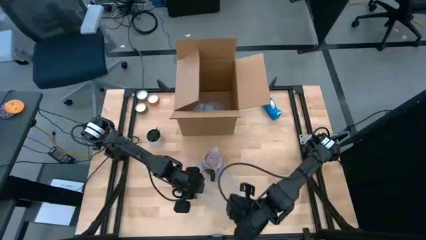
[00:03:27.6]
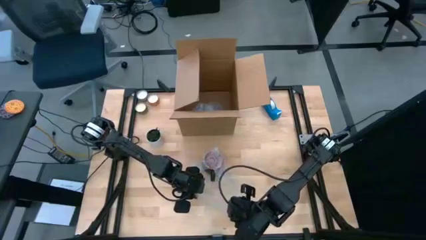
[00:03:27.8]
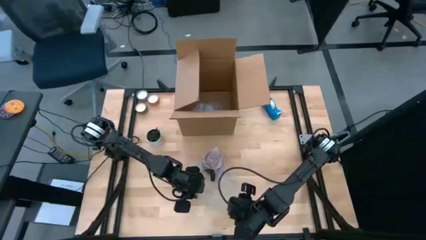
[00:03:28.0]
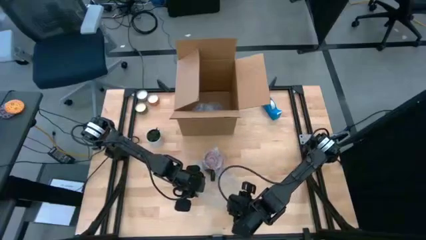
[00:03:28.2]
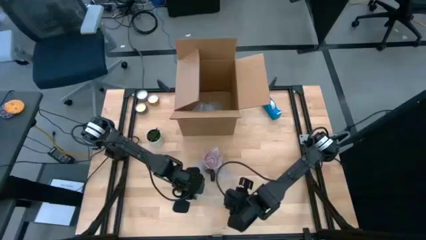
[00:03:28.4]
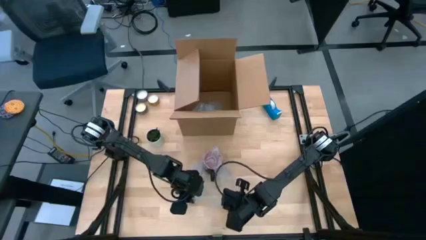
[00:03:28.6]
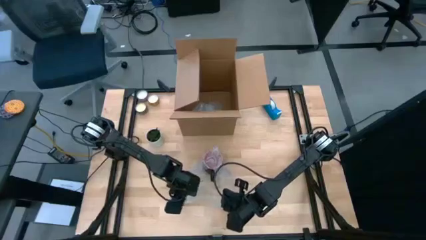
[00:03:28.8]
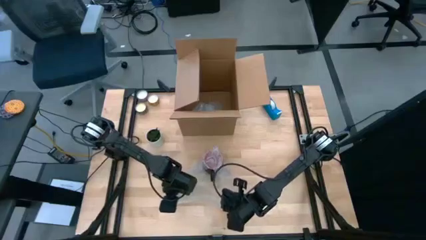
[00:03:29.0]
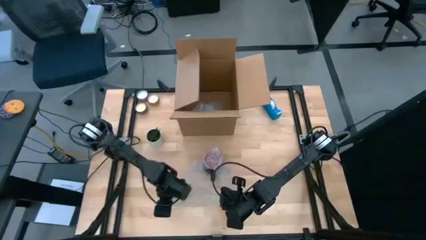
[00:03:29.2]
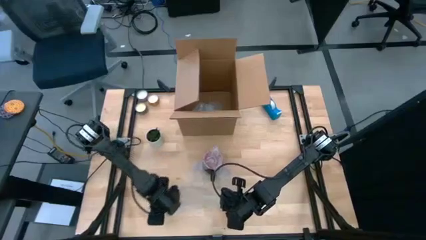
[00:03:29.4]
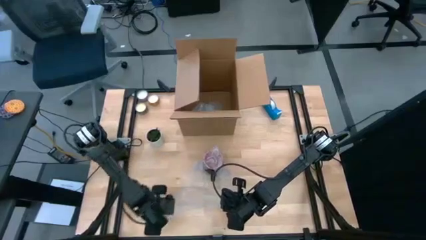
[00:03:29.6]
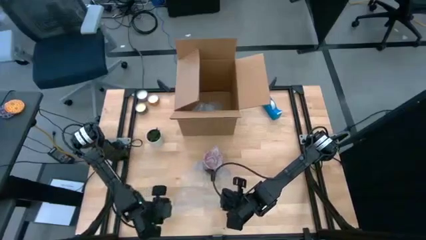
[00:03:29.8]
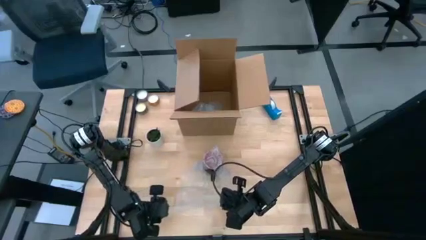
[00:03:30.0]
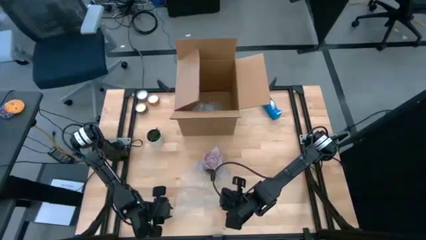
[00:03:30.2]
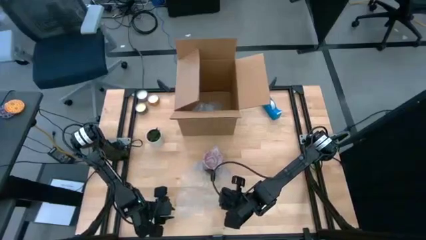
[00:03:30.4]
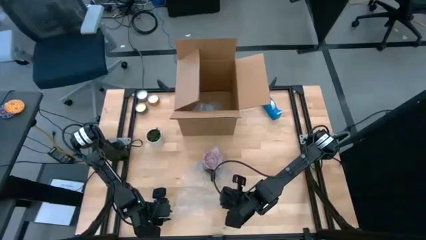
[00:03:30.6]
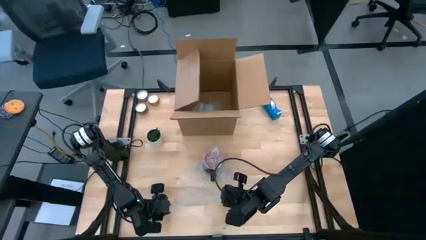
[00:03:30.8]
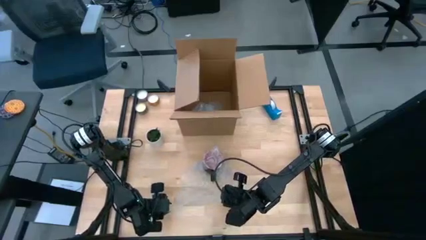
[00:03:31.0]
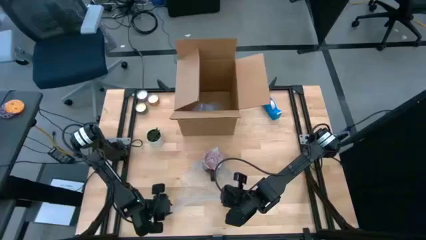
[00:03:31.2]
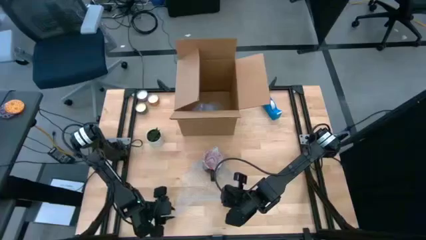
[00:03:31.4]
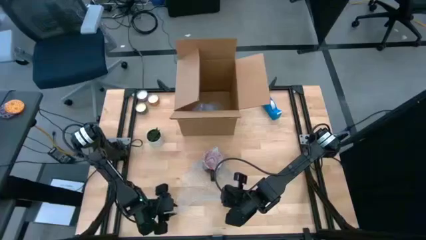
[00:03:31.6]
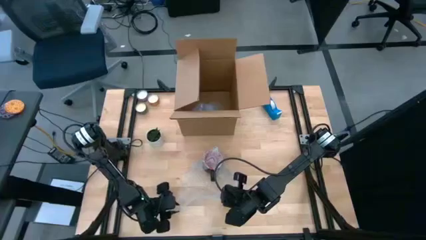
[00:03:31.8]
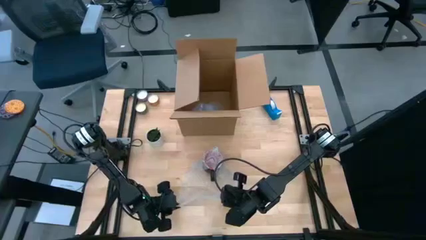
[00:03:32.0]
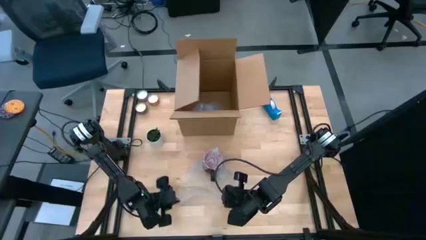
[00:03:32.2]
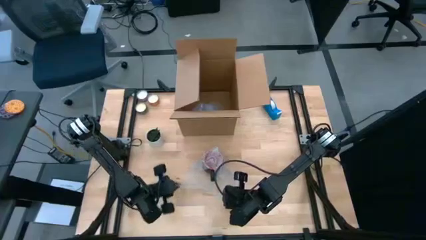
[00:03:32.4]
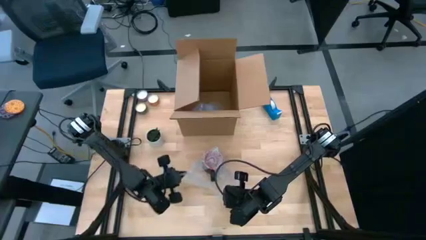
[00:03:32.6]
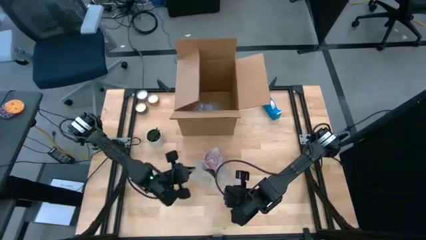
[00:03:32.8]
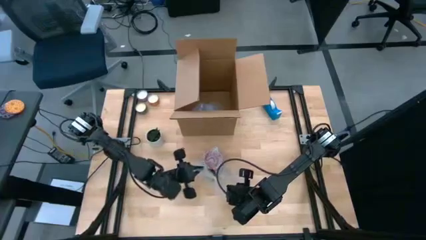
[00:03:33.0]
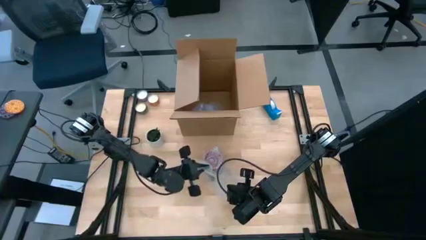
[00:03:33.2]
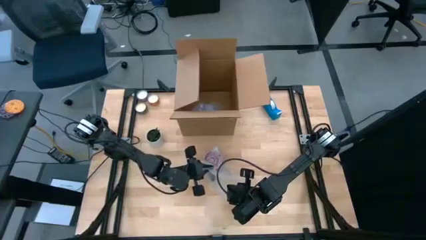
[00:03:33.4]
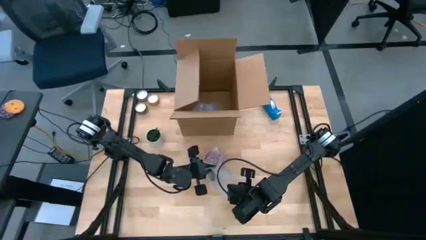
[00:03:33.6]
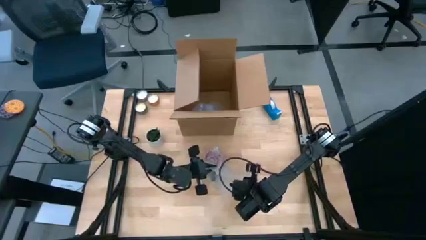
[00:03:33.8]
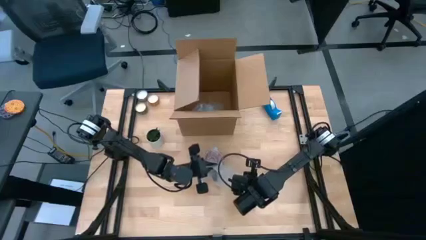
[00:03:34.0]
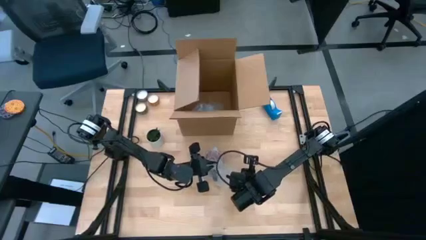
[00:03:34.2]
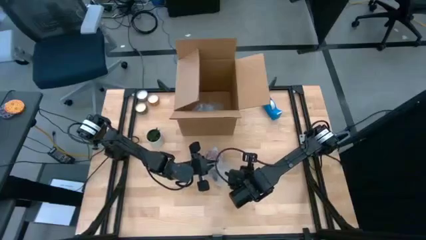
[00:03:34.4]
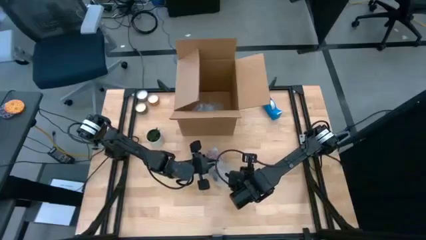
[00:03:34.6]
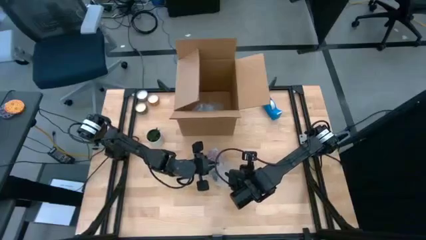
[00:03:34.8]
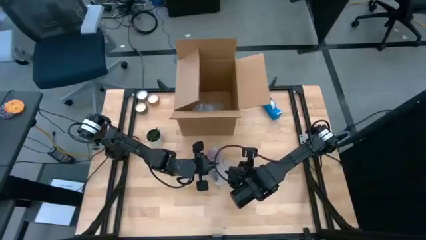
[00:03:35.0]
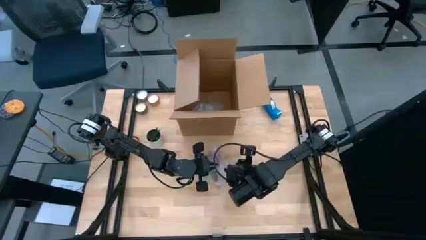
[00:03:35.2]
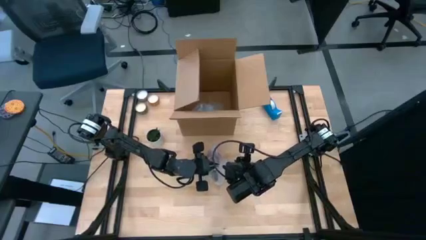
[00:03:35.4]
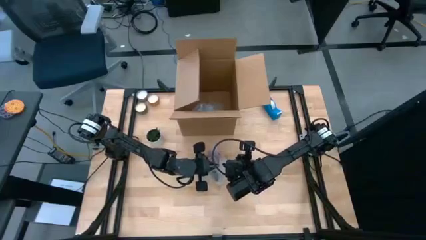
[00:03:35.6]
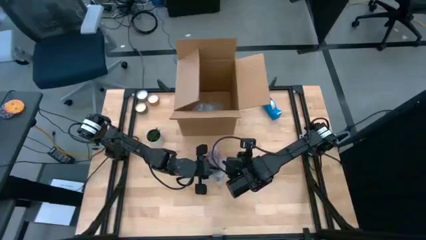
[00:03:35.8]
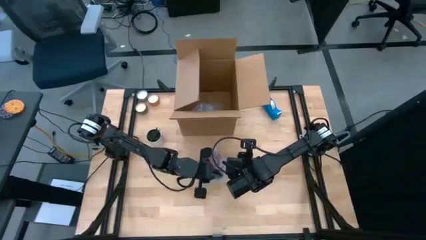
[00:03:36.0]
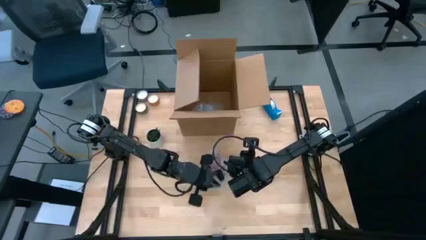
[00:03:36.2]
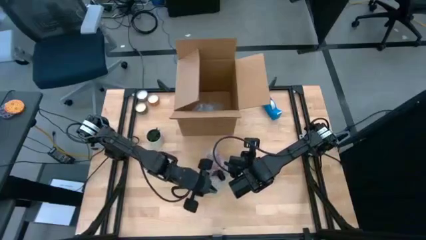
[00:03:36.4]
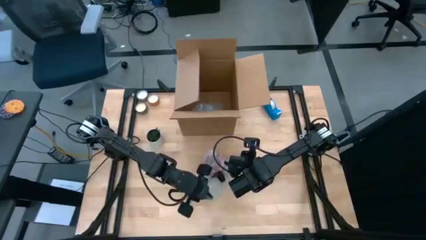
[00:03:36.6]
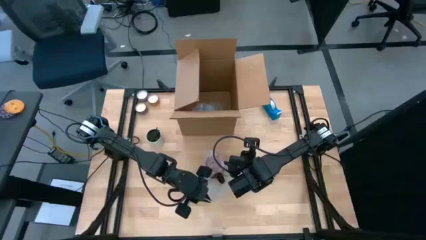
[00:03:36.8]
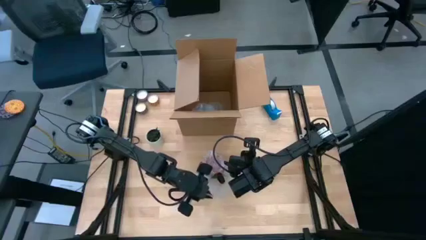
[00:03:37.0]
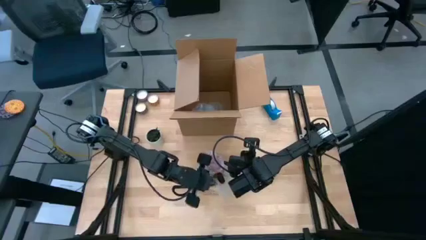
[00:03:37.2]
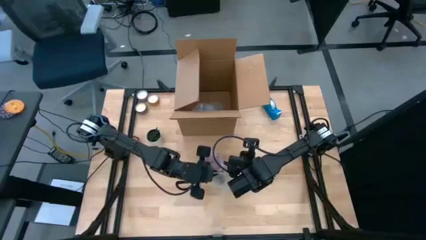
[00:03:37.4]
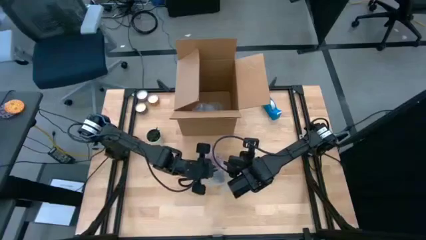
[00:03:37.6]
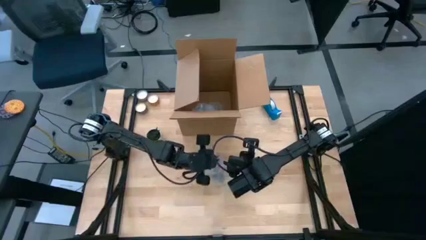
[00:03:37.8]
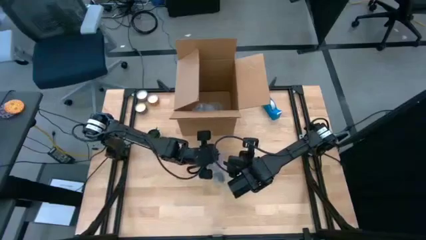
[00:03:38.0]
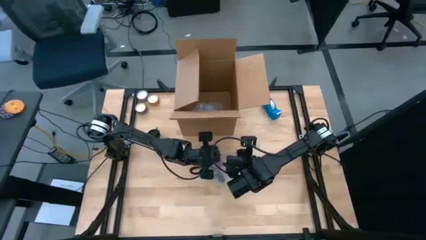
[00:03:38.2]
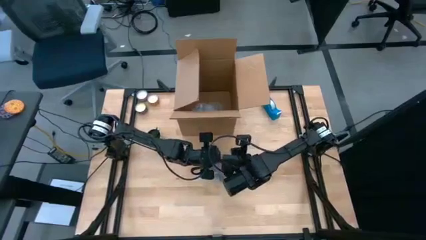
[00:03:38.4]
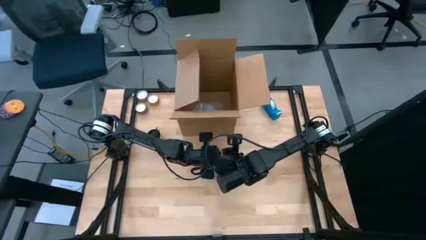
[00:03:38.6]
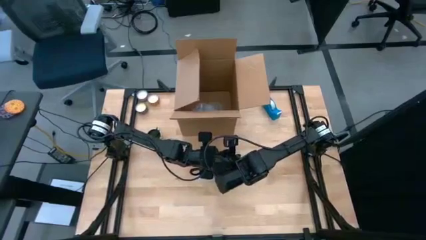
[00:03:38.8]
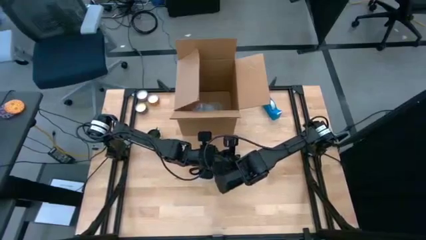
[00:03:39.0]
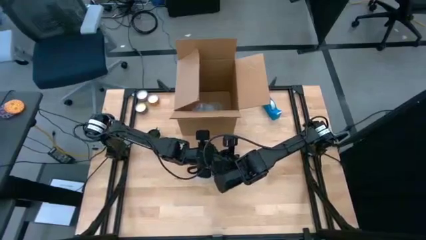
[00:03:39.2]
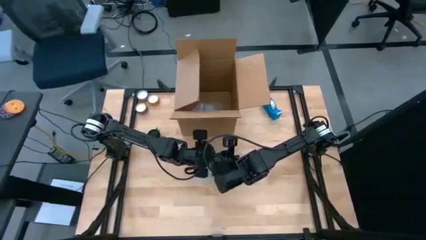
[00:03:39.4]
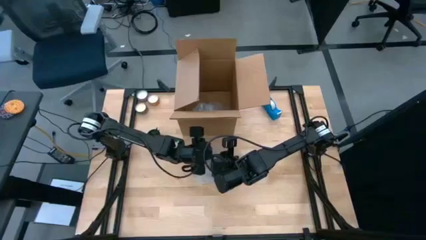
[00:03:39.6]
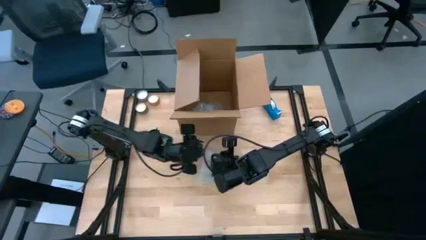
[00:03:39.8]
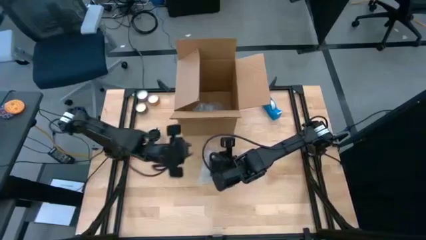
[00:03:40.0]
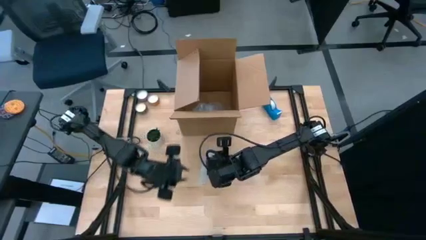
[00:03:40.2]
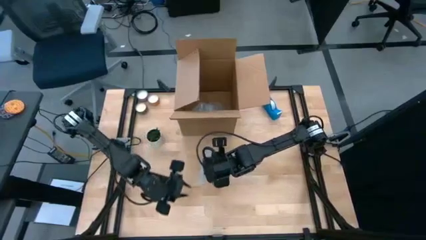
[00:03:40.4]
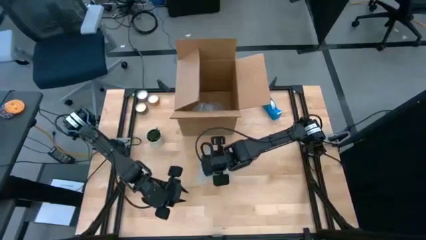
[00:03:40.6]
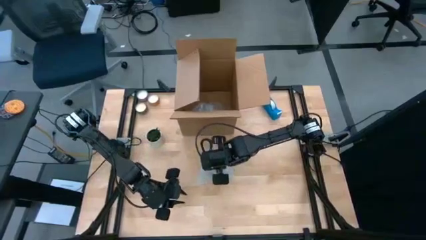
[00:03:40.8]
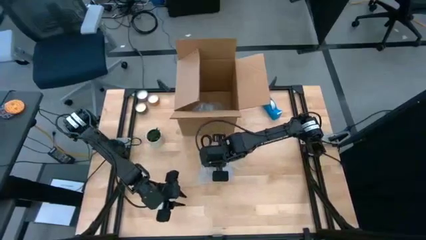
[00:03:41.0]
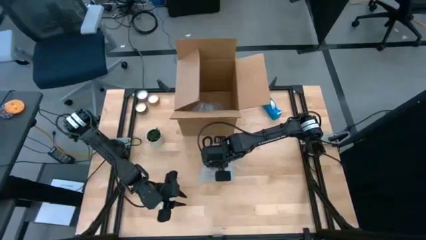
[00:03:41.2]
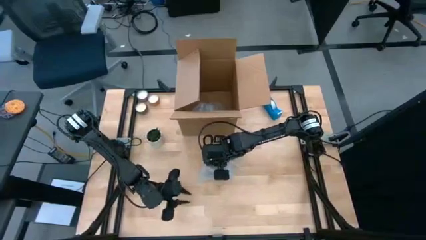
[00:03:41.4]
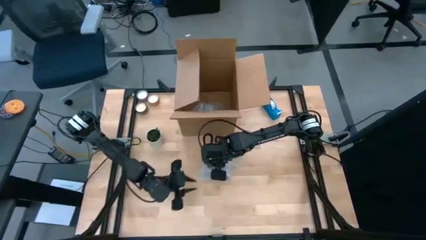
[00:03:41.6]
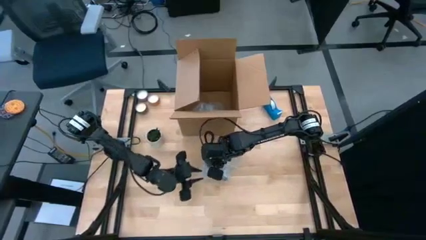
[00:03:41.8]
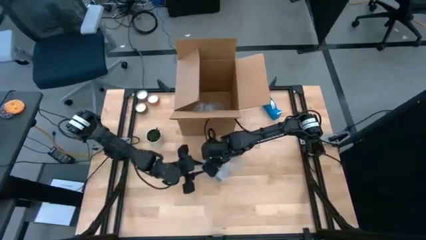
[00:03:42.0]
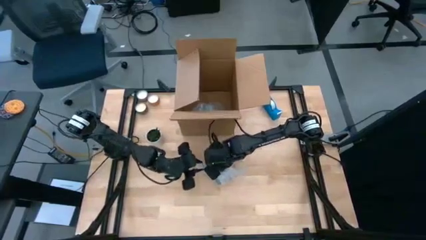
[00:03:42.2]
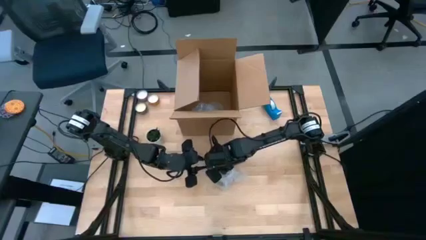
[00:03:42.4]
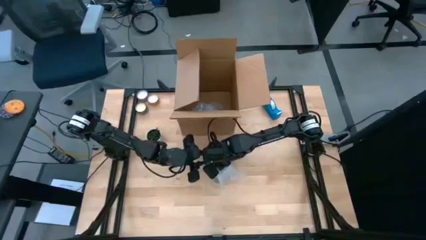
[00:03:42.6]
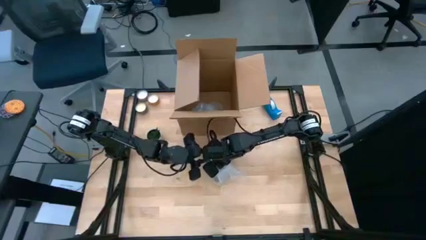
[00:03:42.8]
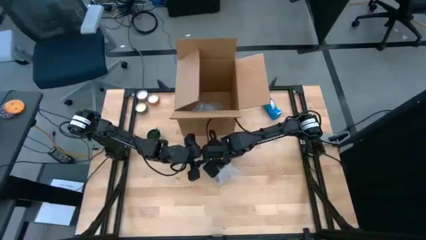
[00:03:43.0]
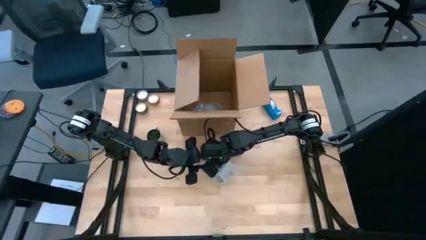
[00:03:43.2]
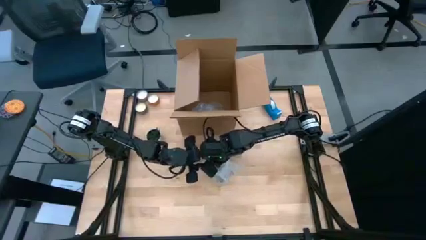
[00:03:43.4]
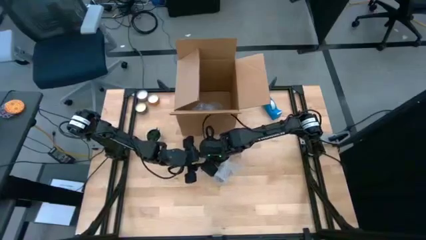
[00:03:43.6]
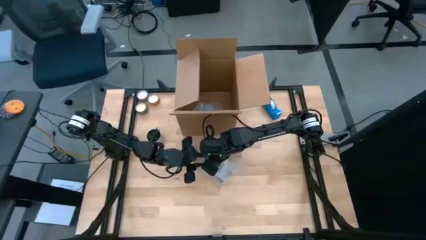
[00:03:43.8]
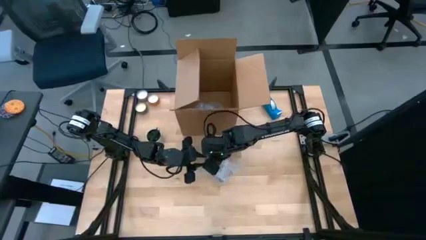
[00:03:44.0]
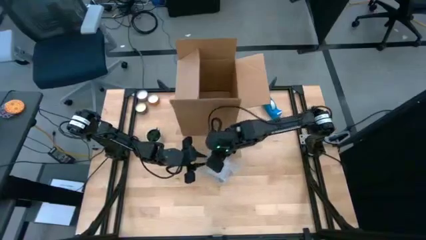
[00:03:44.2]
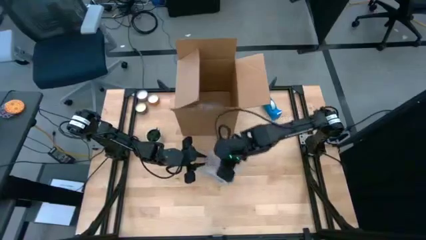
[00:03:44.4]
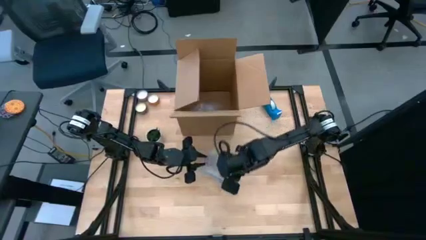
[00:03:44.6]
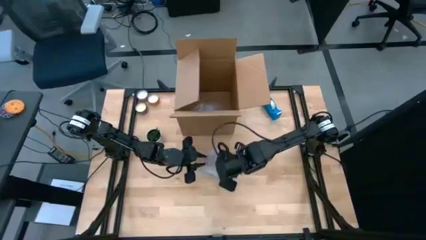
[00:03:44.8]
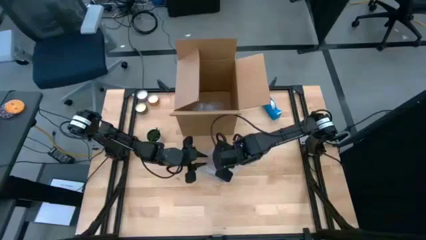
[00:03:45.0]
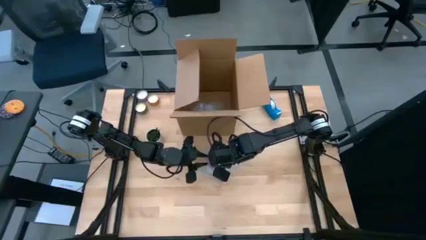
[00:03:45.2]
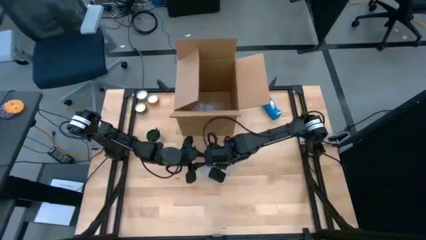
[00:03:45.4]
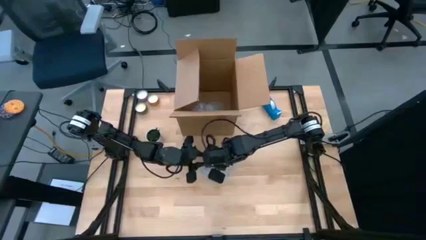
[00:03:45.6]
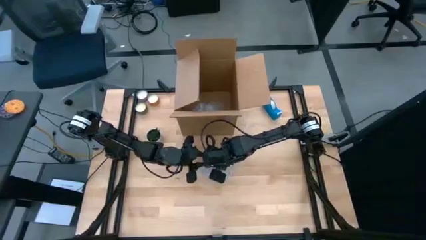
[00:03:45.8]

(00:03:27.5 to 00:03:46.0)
Task: wrap mug
Wrap the black cup with the transparent bubble wrap
